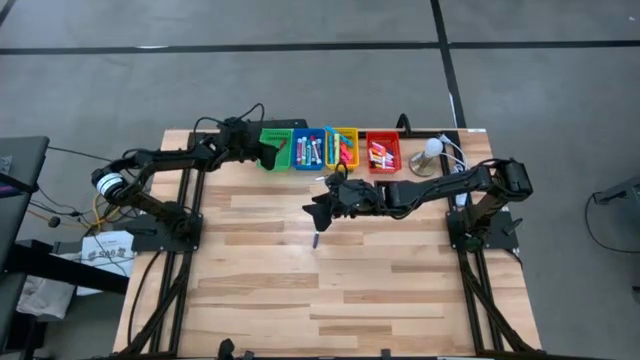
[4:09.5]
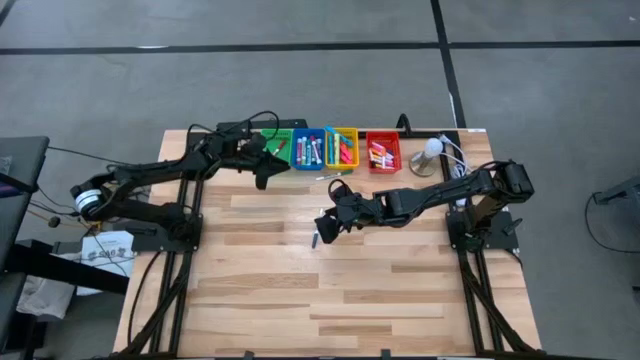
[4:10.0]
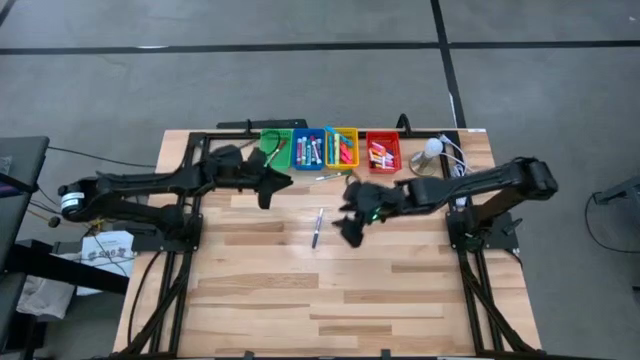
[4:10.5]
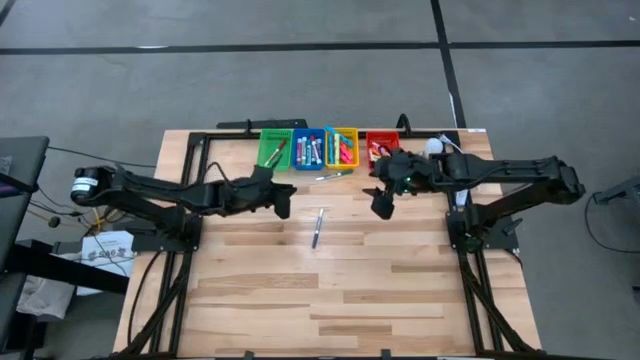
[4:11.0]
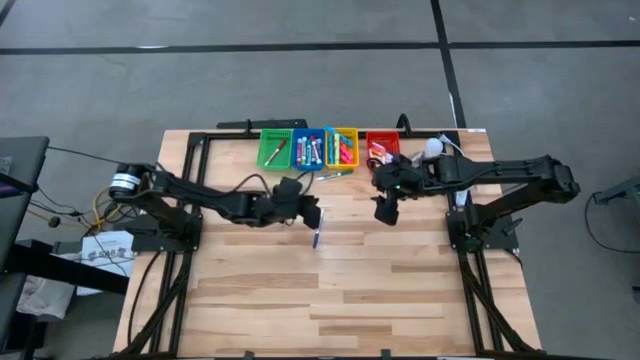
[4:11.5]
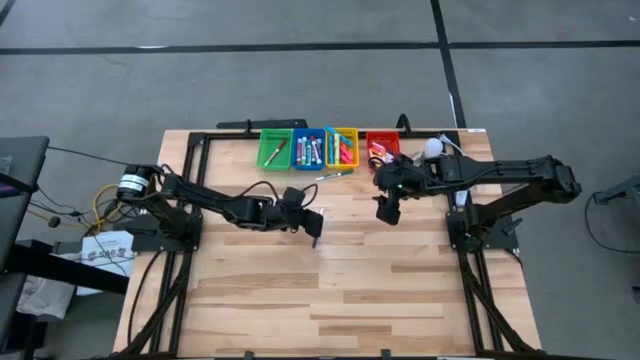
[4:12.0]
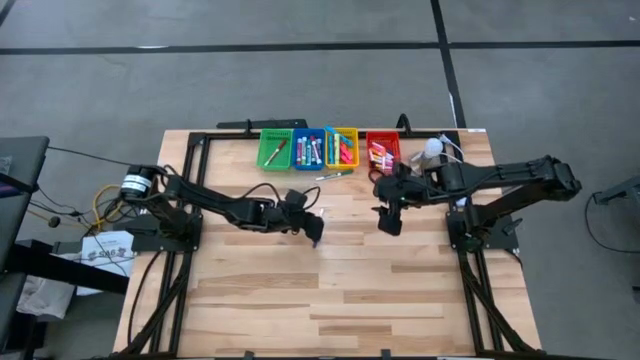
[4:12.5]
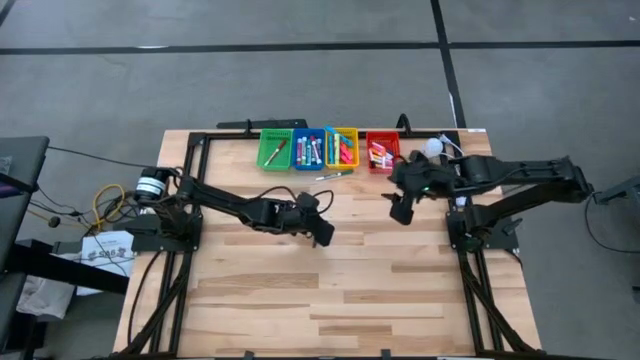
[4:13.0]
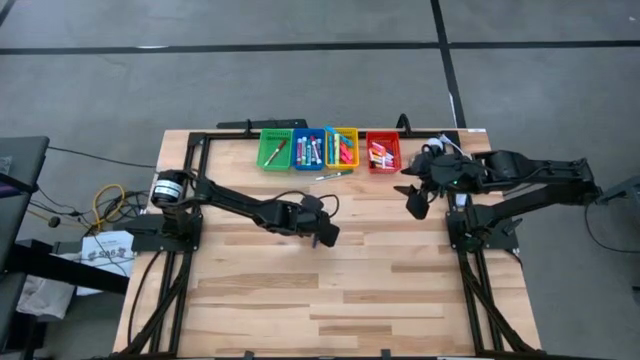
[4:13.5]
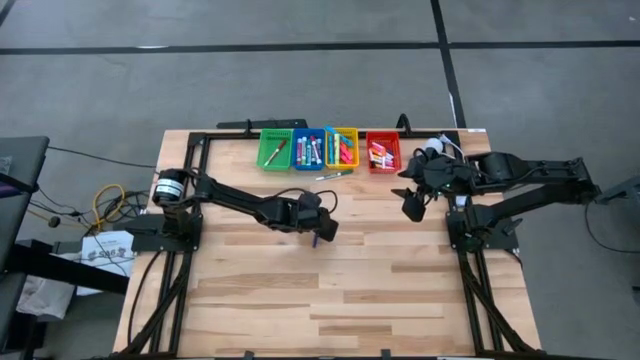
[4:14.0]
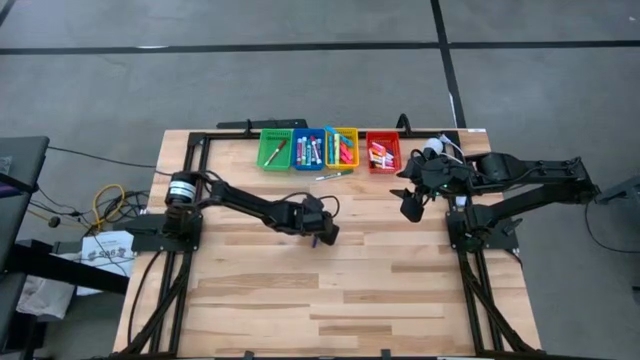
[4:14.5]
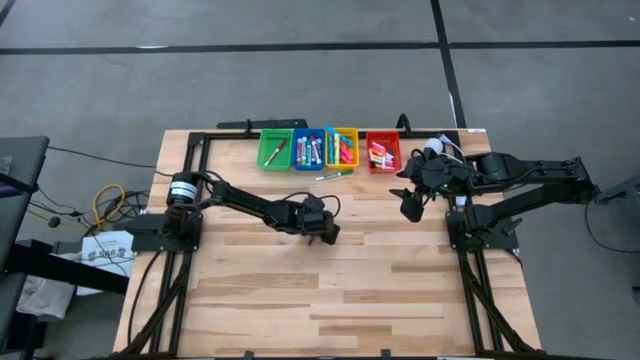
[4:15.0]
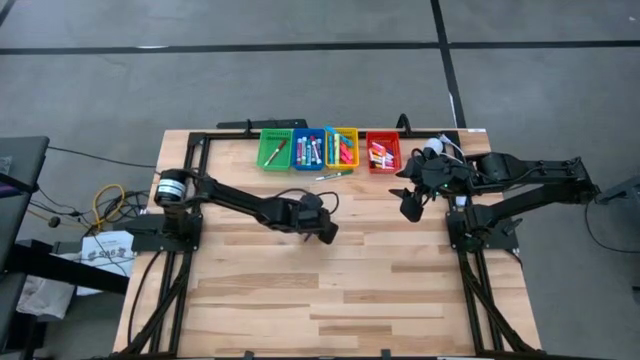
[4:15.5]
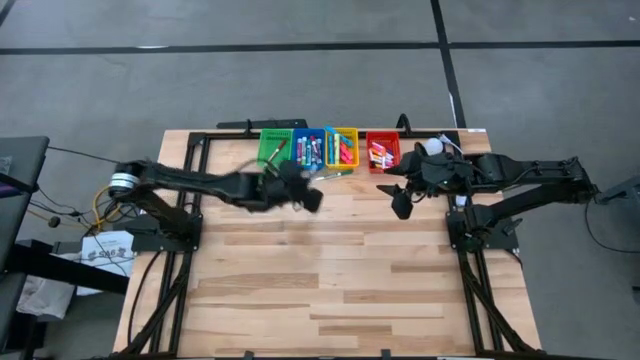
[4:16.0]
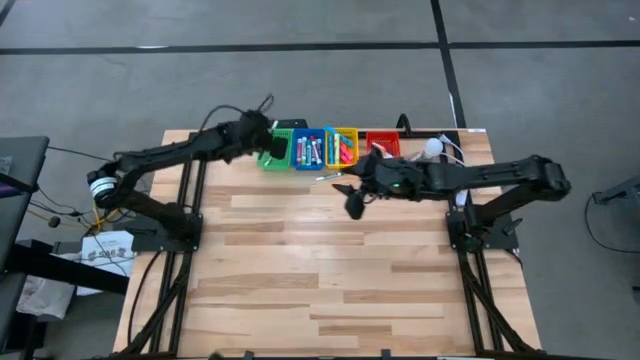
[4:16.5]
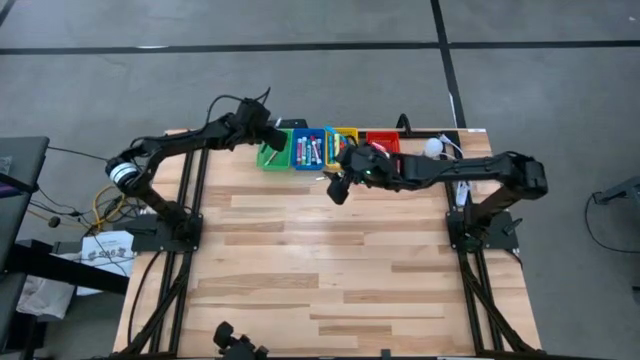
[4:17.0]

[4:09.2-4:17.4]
Task: Pick & Place Markers
Put the blue dry erase marker into the green basket

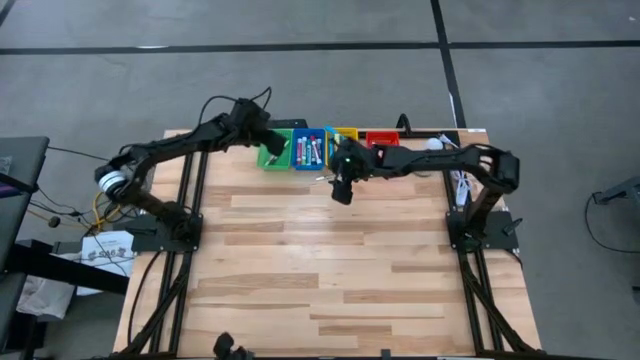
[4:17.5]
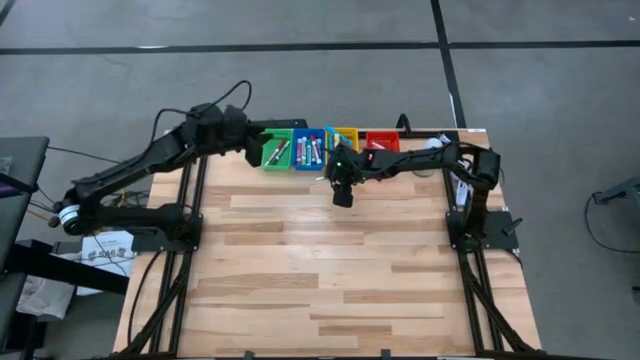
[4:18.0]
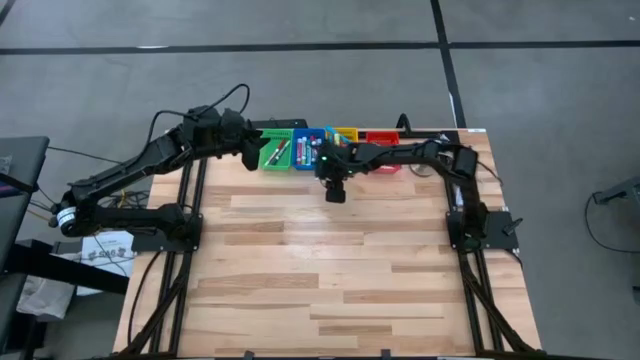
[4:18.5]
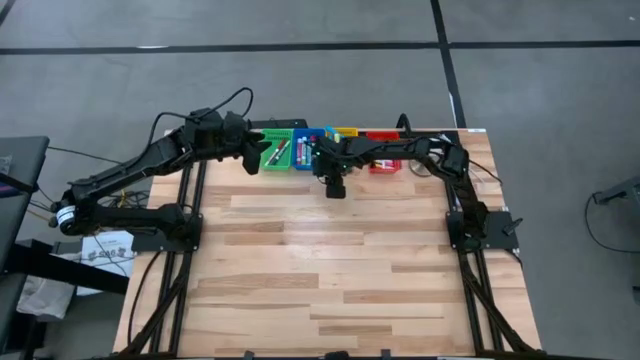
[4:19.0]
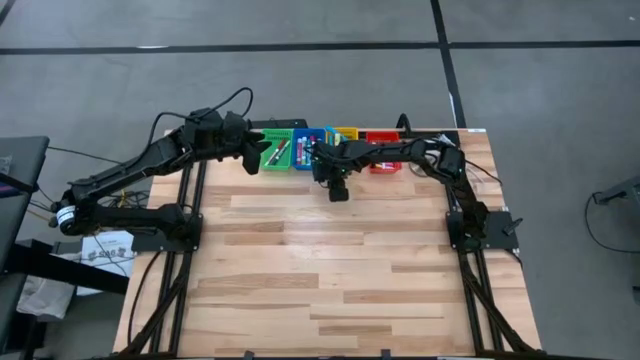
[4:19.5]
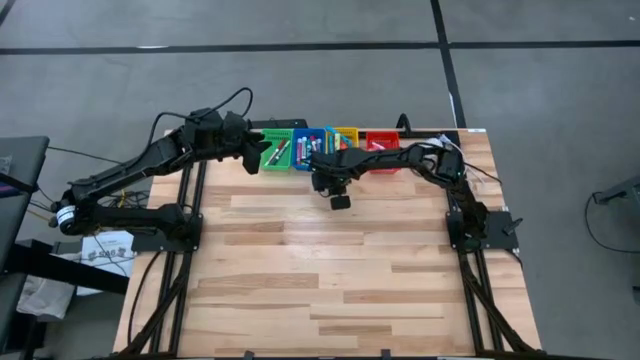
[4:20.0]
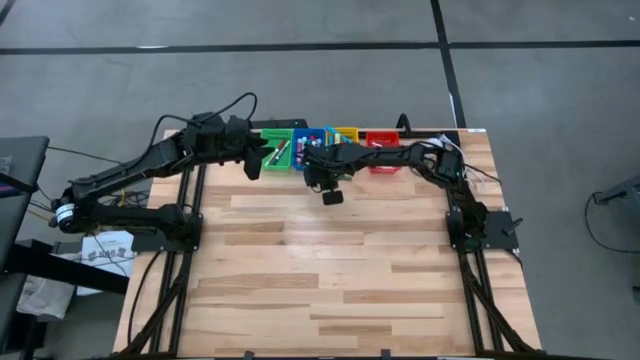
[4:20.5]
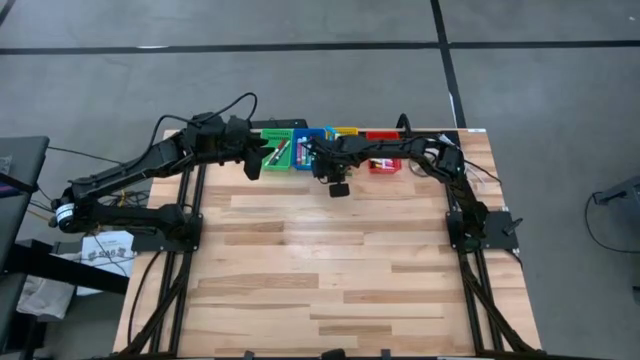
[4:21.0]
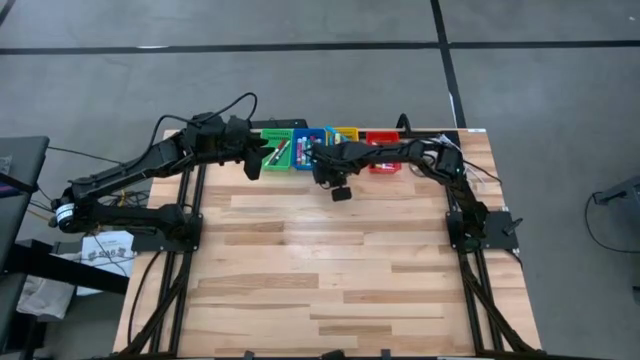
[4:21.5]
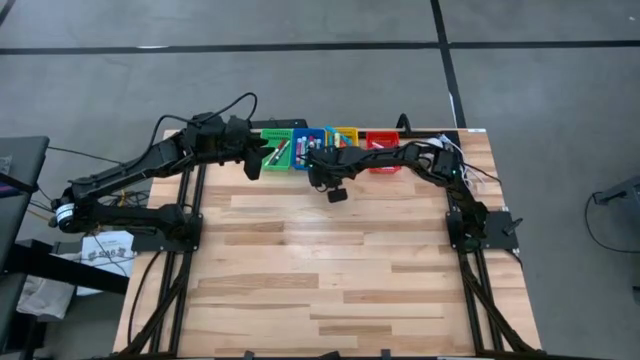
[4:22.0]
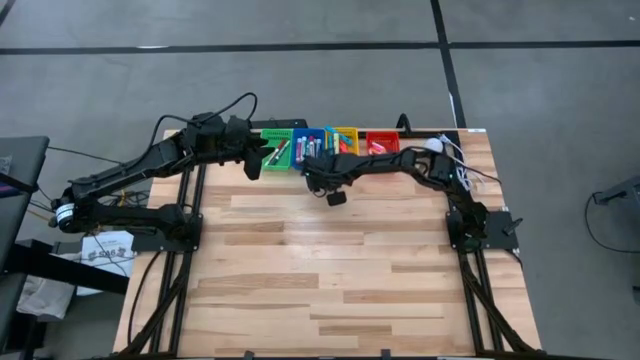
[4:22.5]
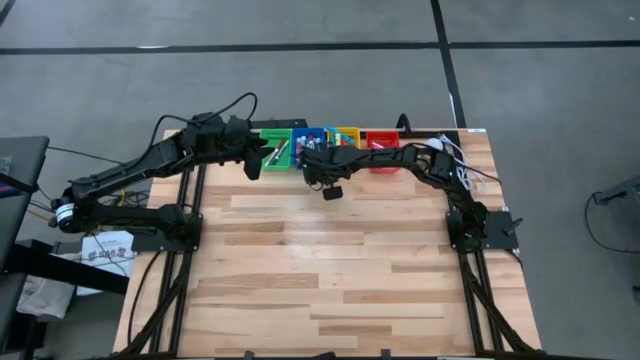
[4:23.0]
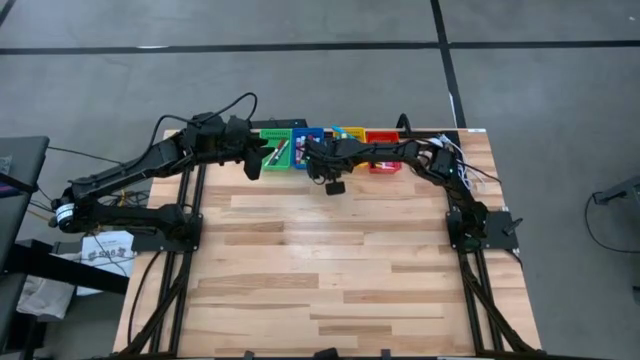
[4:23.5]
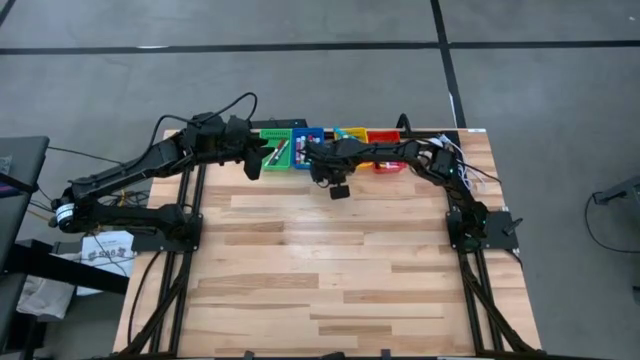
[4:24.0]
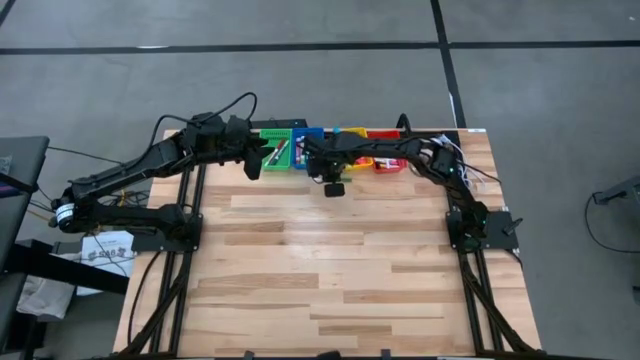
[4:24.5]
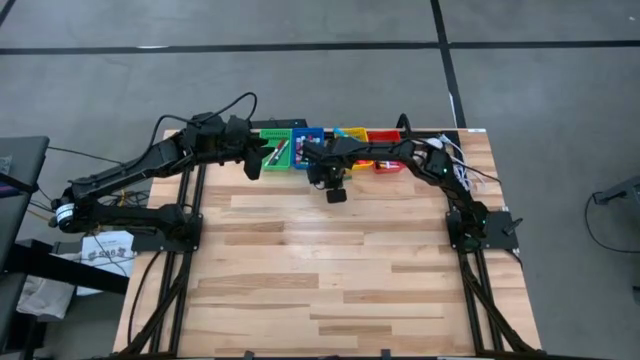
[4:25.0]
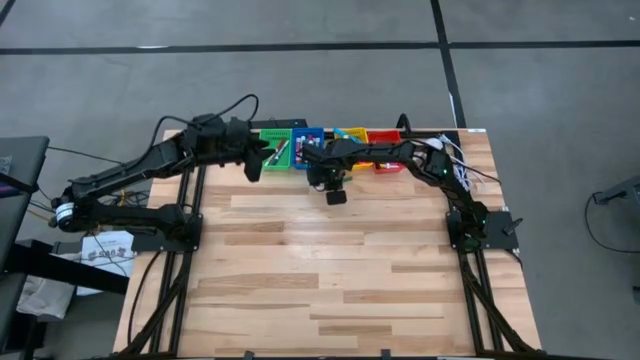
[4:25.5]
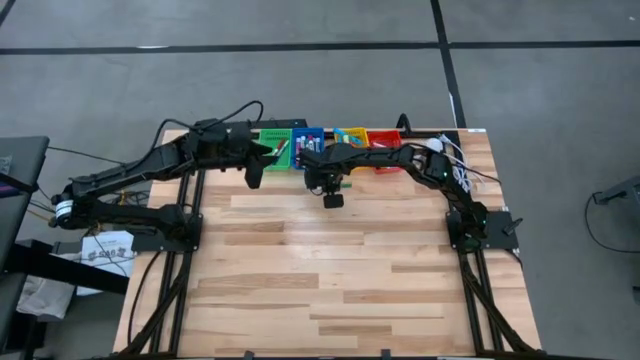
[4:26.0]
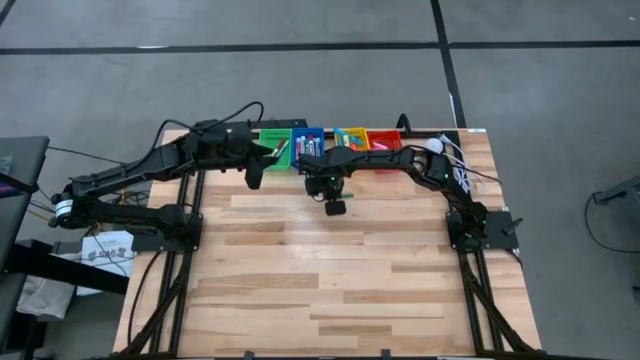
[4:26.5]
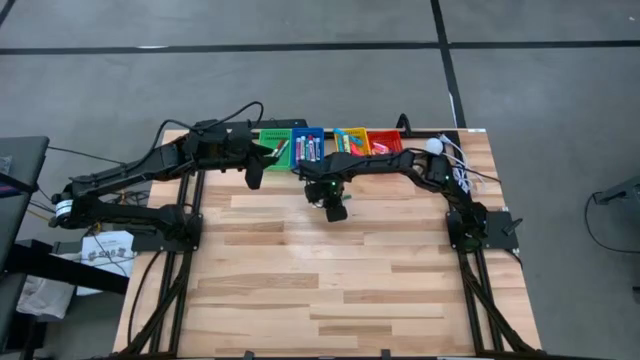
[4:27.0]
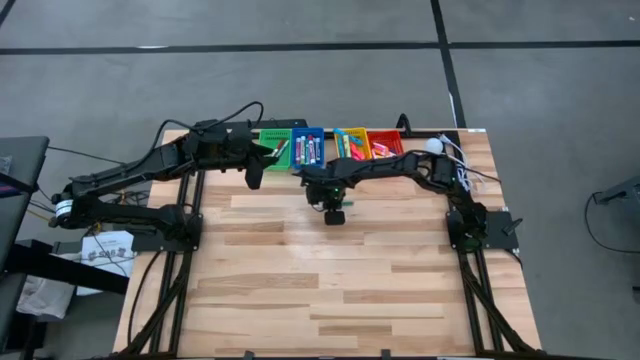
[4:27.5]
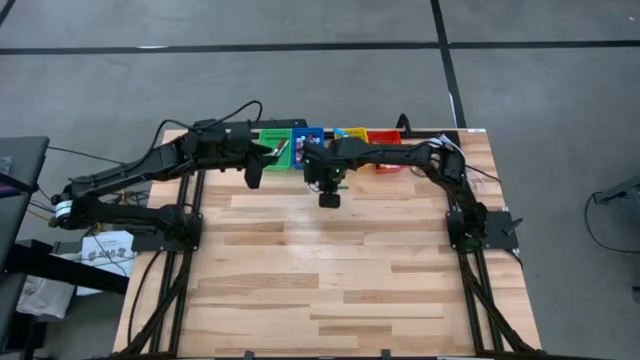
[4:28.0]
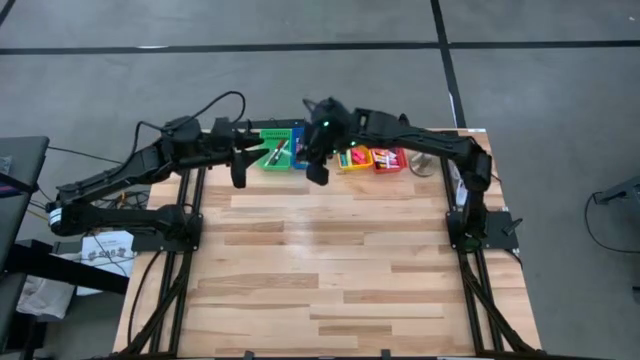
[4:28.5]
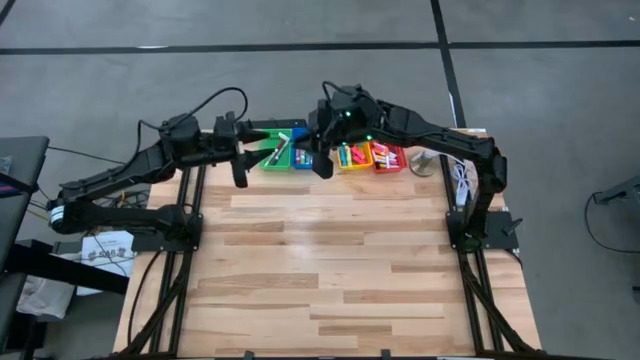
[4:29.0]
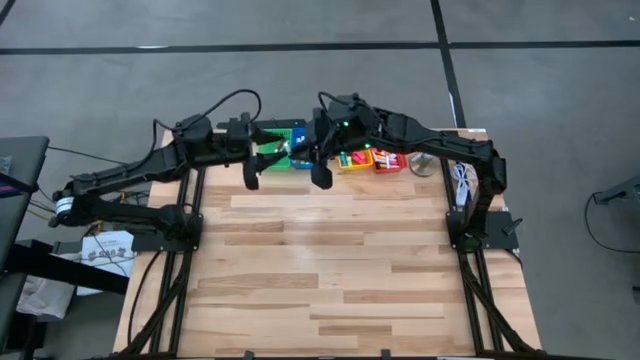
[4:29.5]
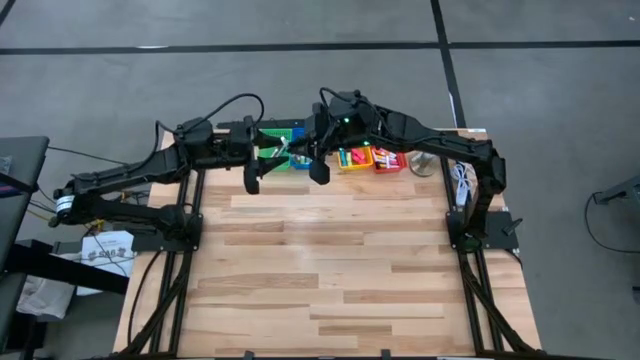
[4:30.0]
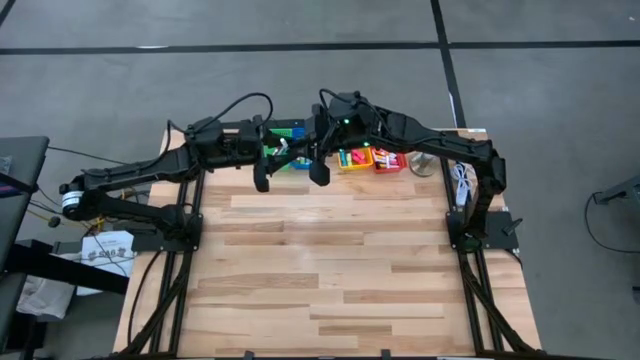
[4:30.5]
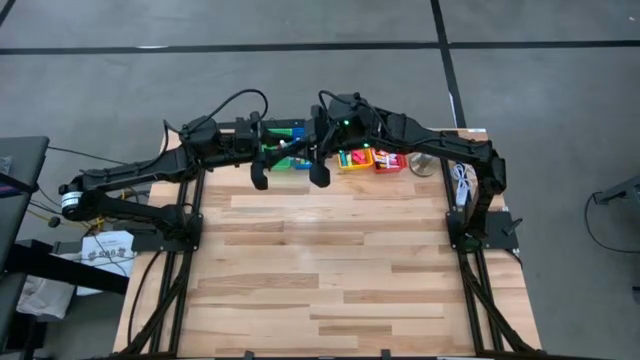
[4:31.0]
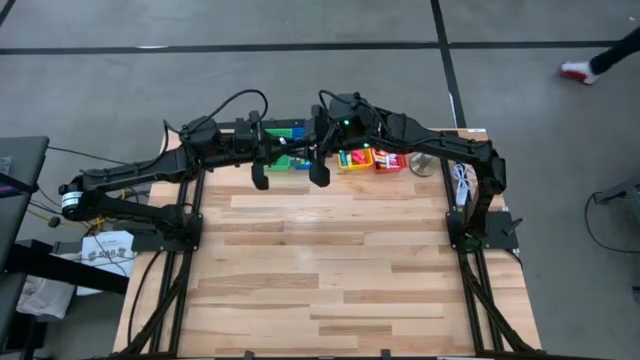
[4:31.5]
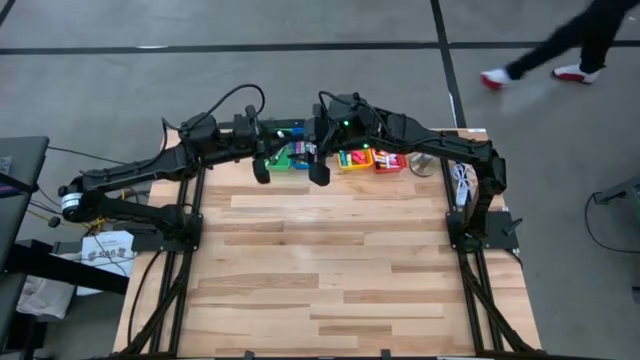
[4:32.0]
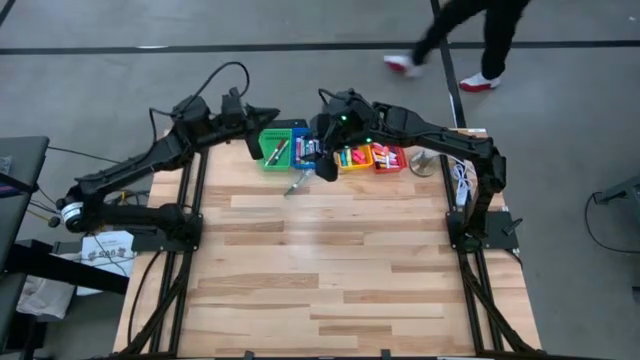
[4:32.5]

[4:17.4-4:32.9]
Put the green dry erase marker into the green basket
